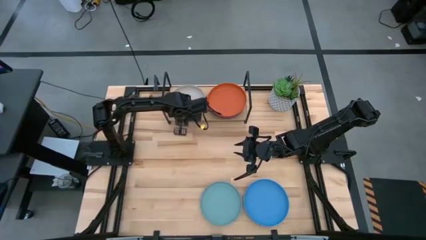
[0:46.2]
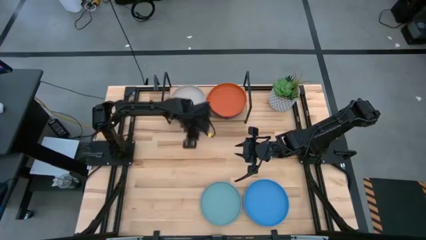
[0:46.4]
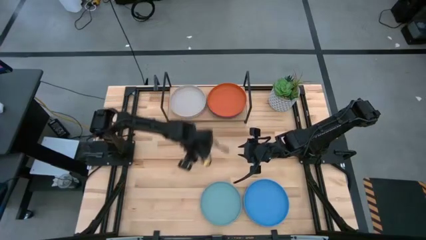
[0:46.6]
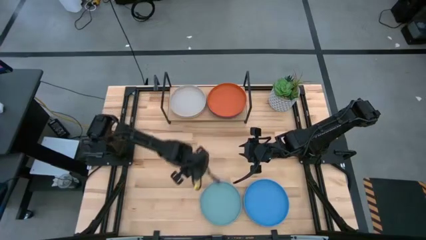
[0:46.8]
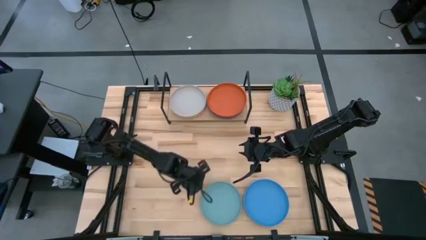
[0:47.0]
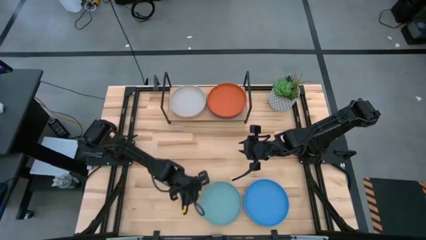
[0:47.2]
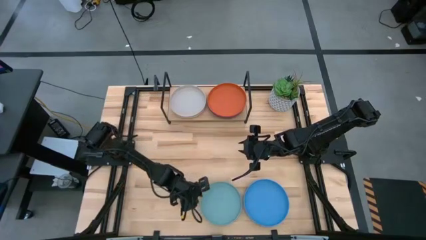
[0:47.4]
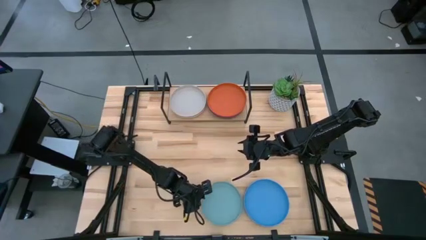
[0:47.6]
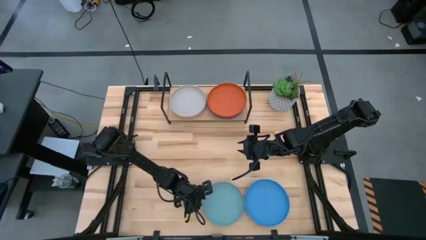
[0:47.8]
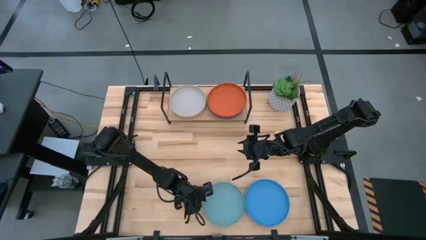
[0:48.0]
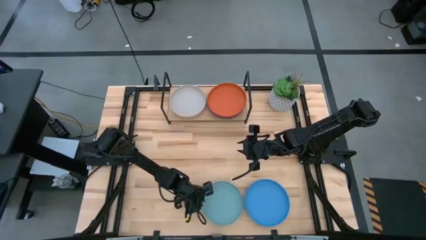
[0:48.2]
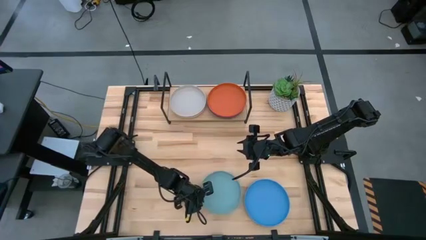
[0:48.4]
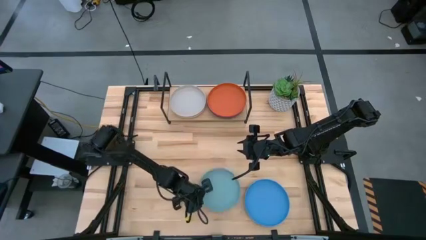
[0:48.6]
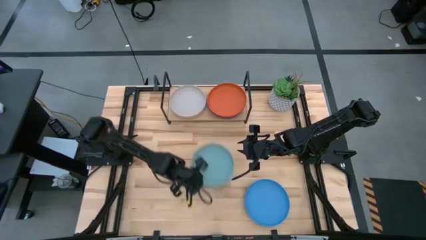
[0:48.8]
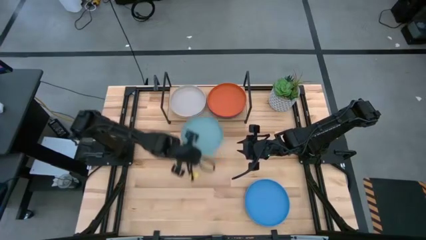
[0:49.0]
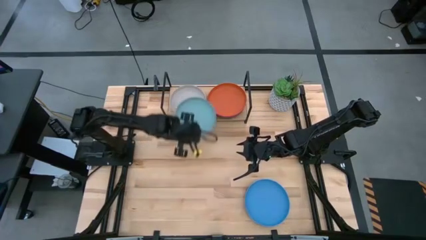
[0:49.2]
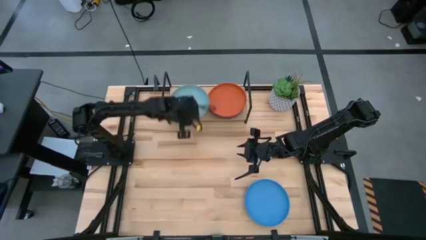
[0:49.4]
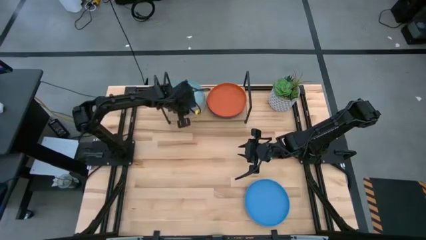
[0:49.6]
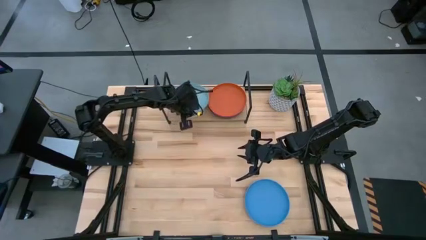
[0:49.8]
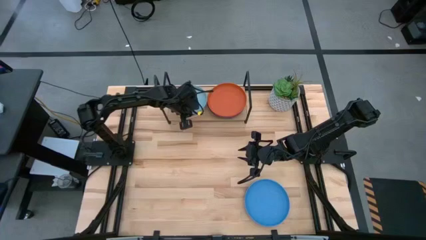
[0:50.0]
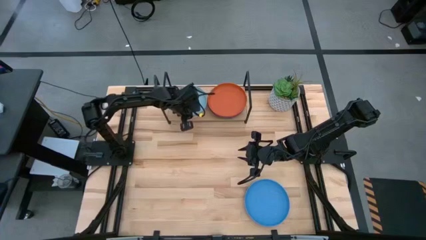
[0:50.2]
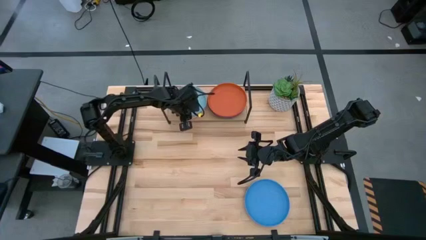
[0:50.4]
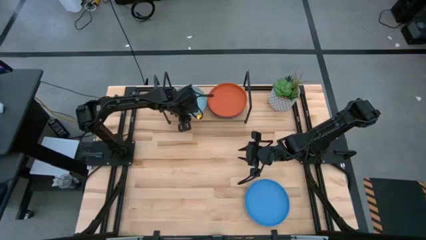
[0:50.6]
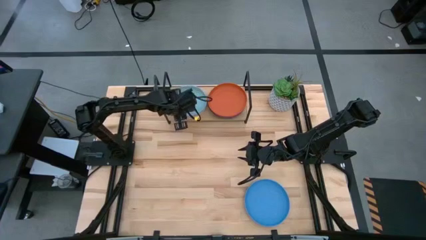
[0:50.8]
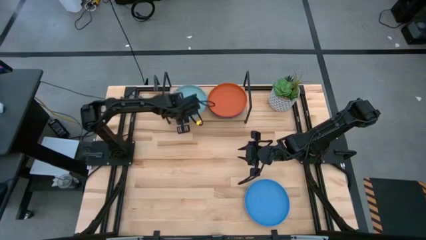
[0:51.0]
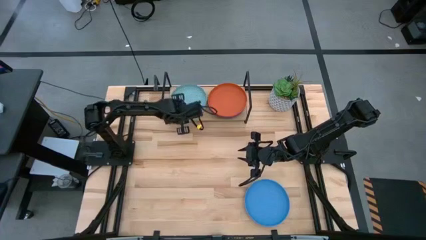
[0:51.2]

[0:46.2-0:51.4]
Task: Place and stack plates onto a shelf
Stack the light blue plate on top of the gray plate on the shelf

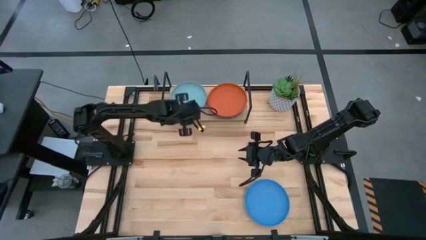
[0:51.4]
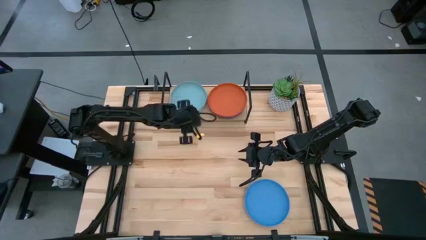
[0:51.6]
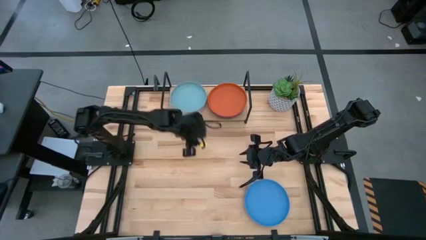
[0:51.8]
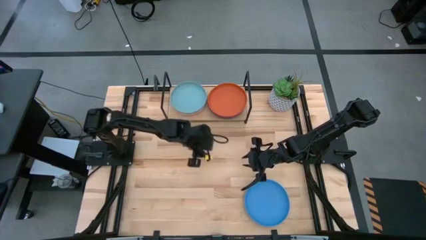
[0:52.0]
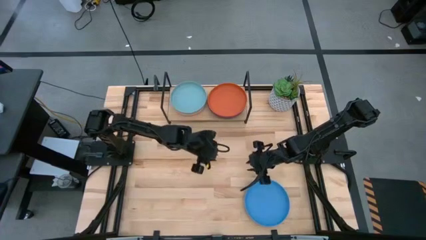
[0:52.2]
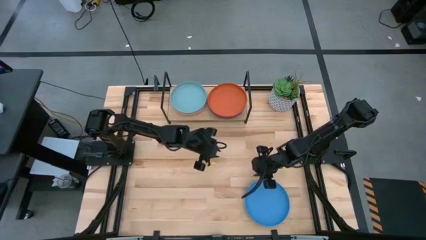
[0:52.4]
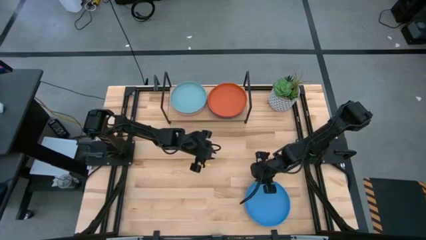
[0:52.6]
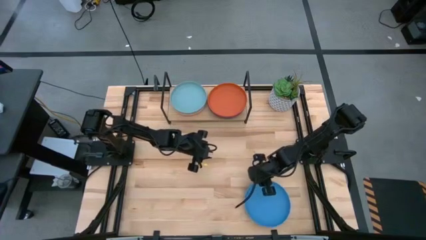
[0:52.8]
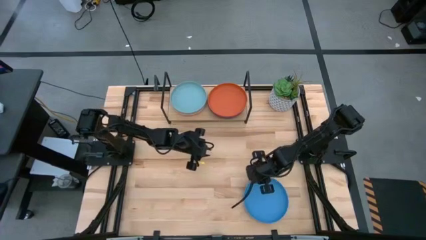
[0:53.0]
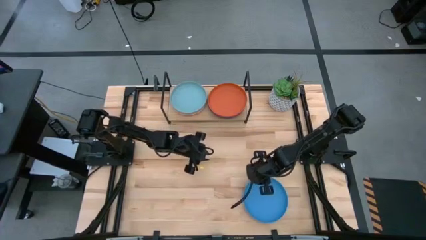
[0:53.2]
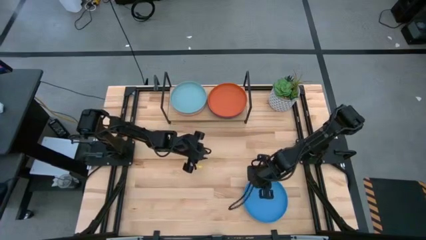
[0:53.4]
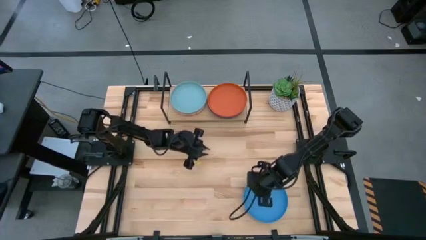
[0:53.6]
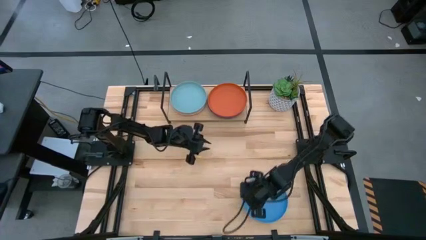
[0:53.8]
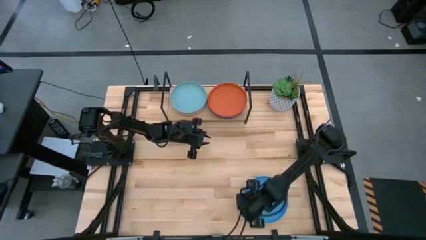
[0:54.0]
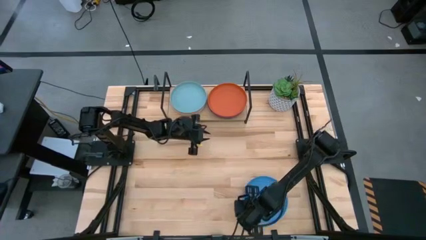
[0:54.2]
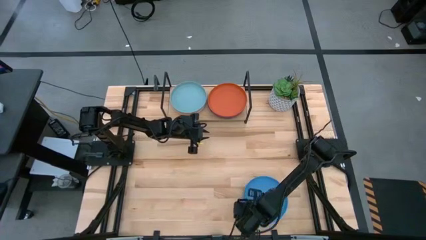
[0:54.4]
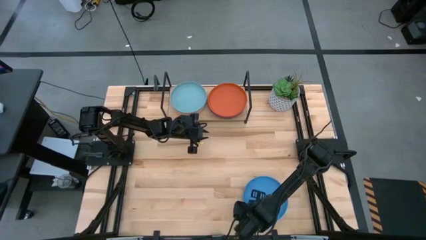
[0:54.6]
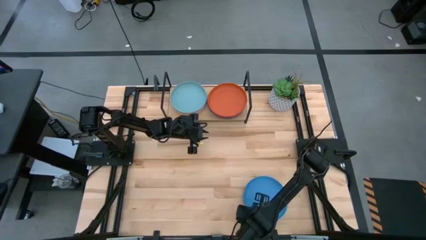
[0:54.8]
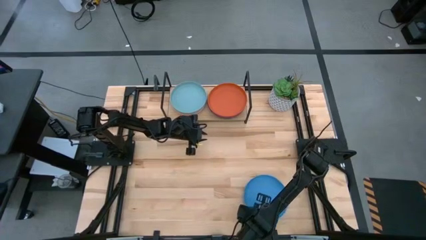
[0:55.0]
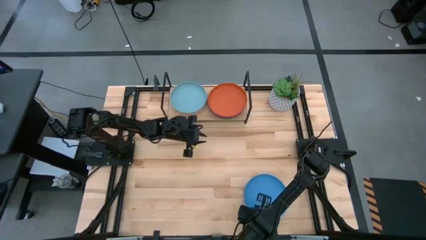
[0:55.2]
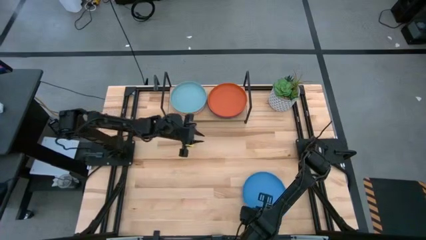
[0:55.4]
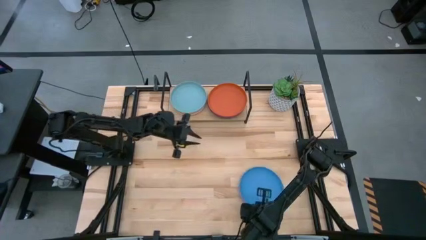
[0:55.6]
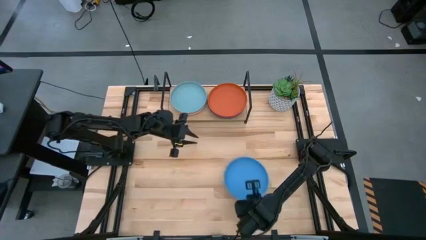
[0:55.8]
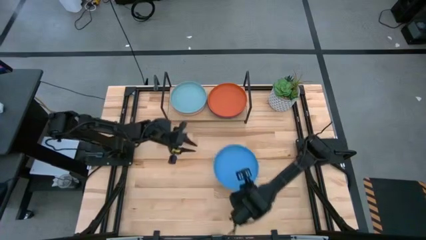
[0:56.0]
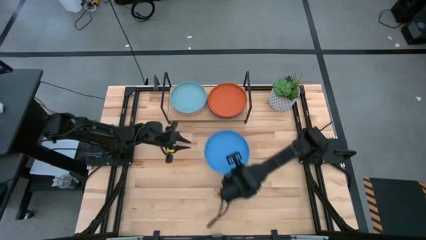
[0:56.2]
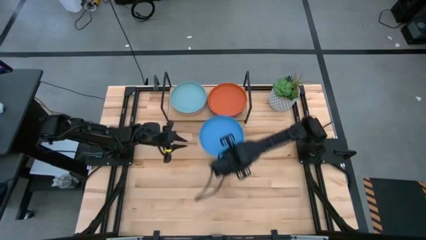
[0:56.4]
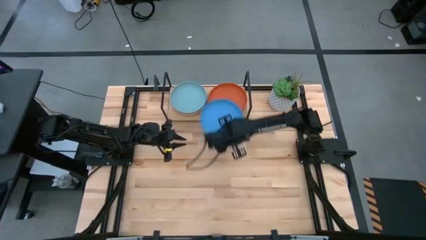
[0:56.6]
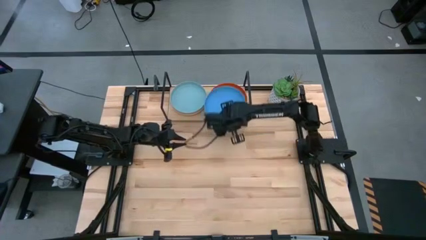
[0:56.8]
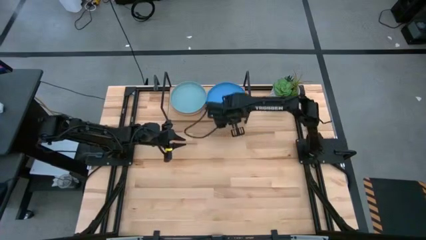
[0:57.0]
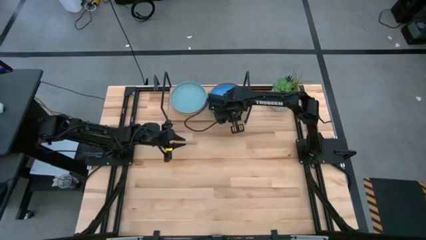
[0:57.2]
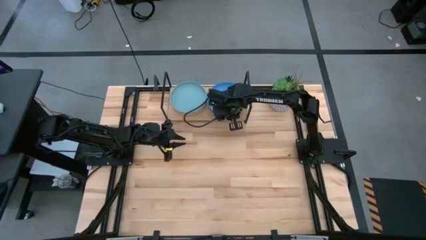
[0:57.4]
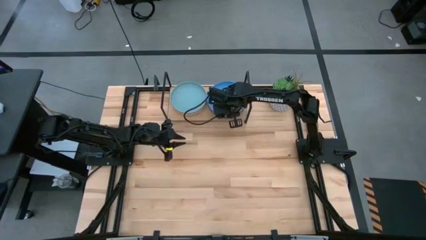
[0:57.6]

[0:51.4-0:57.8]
Stack the blue plate on top of the orange plate on the shelf

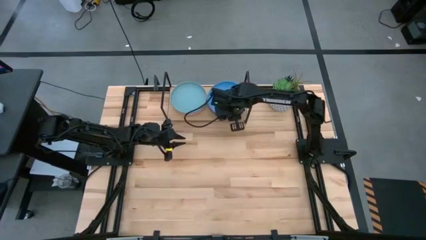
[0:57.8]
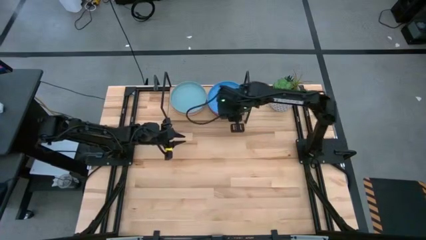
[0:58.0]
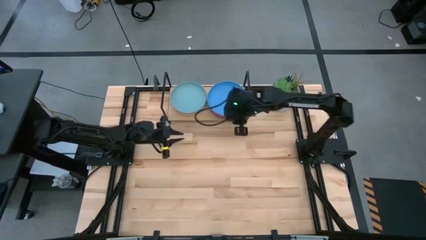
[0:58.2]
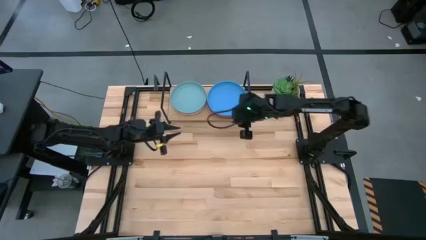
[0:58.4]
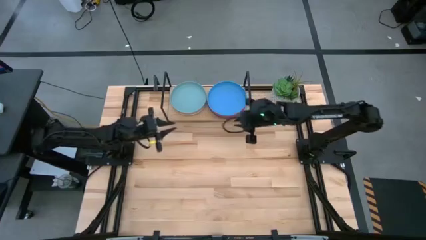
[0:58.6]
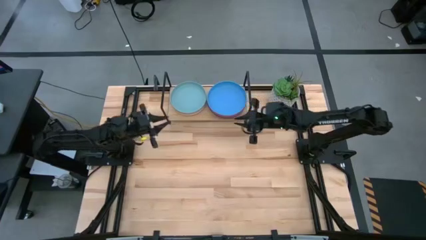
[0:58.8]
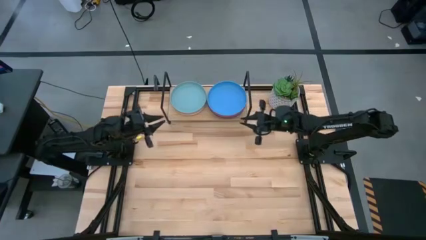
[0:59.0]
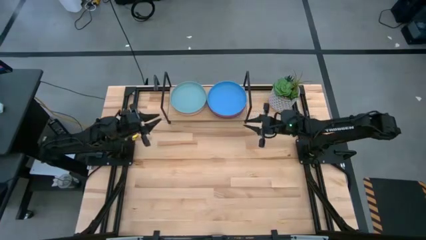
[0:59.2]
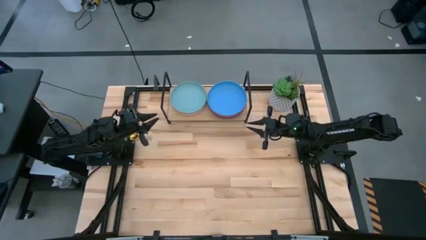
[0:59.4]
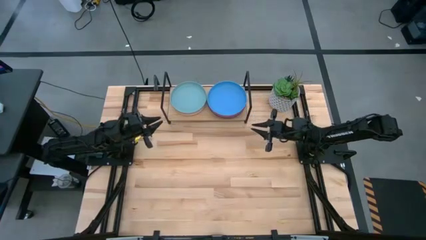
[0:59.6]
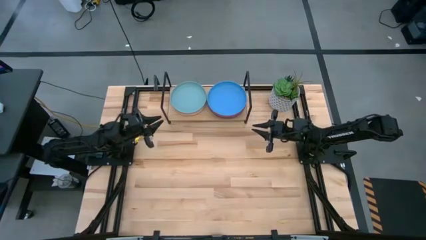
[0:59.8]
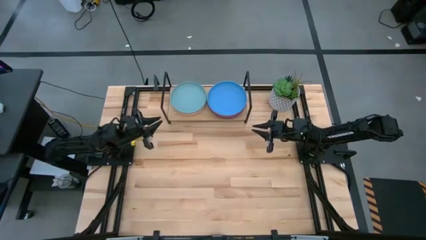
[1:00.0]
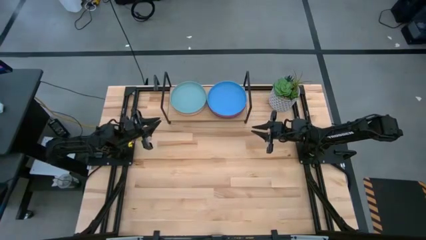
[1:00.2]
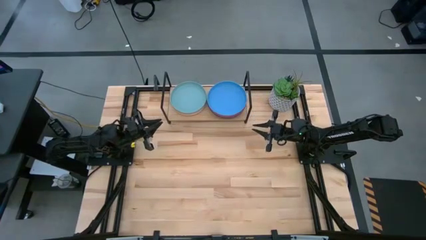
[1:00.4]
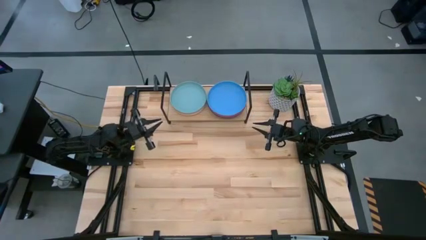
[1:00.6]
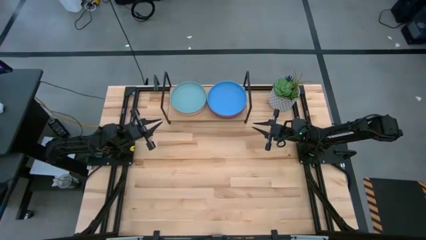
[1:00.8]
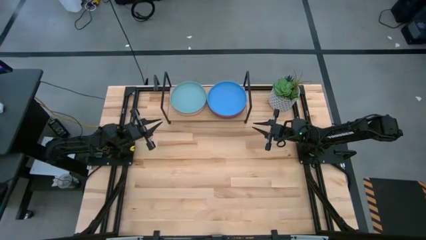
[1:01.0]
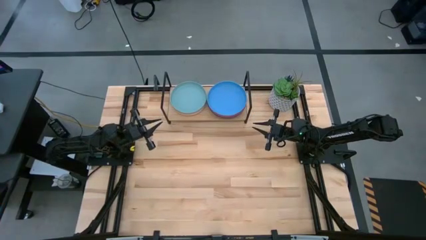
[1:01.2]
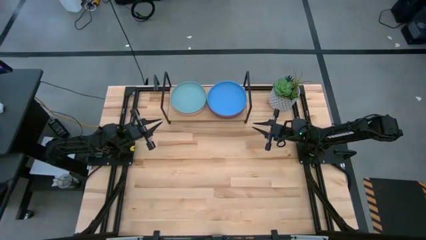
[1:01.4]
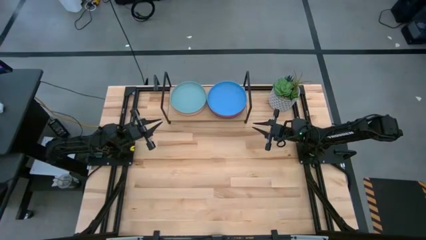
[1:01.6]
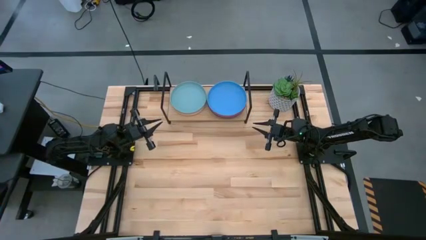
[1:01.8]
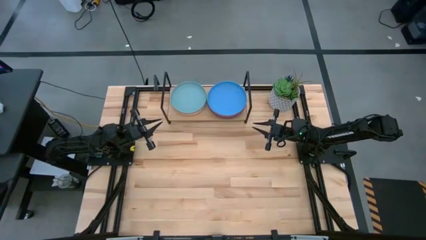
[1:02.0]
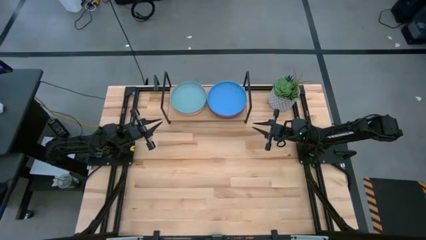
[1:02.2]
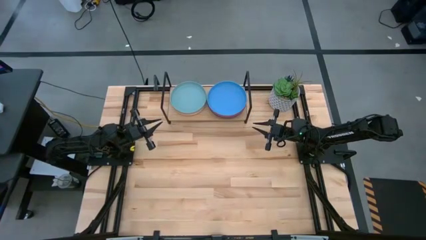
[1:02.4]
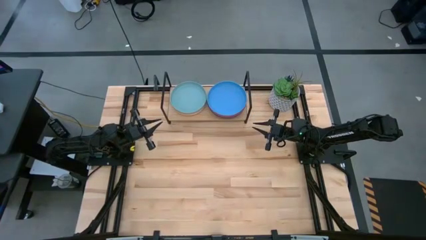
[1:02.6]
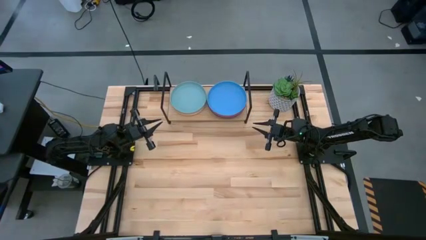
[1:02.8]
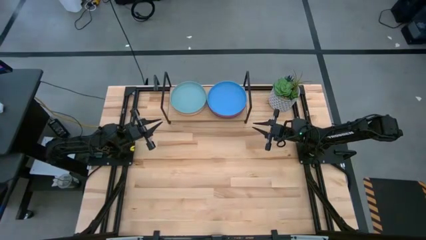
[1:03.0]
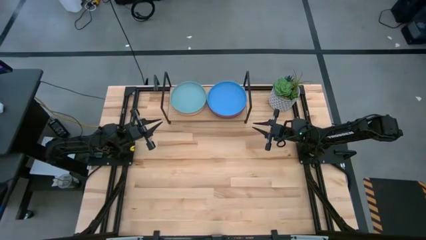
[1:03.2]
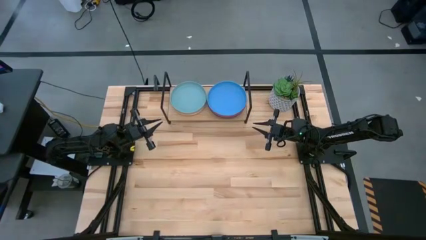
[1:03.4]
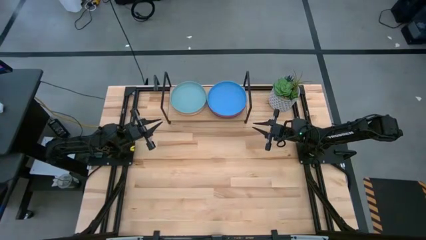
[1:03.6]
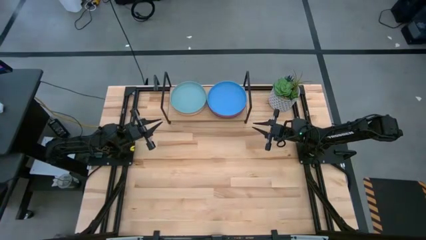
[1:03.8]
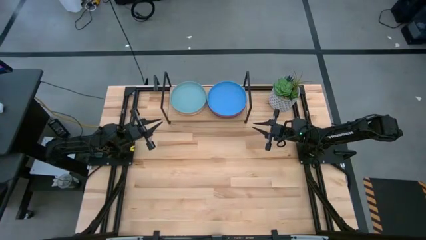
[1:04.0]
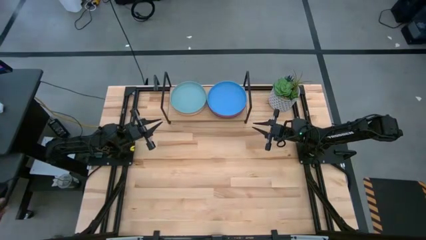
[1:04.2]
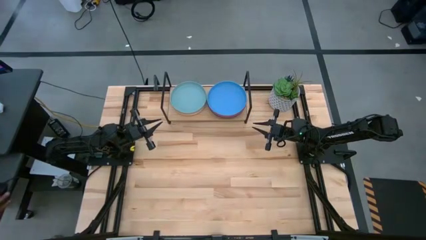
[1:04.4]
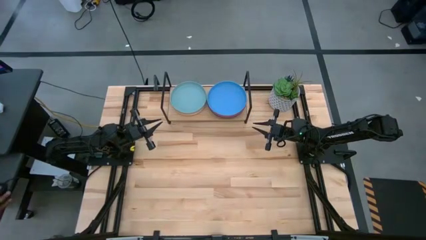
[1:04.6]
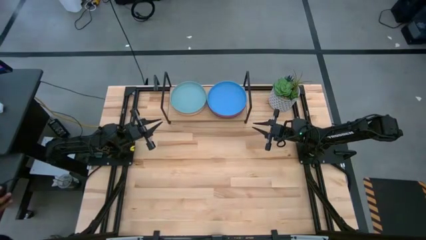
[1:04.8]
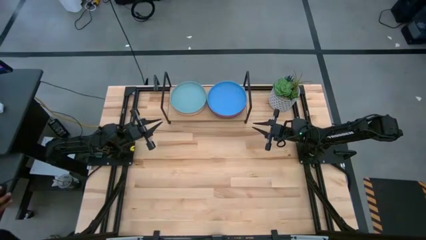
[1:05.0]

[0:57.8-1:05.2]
Return to Home Position
